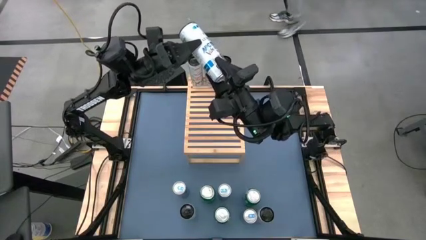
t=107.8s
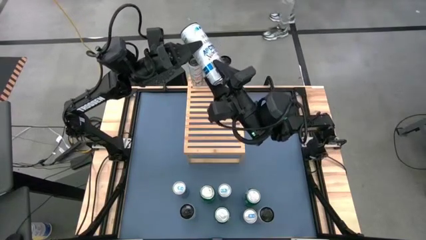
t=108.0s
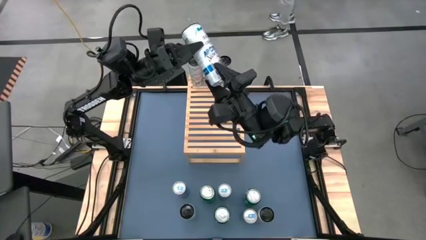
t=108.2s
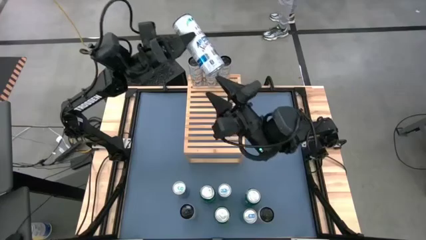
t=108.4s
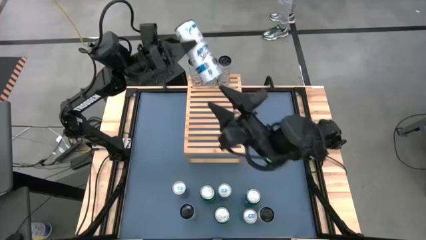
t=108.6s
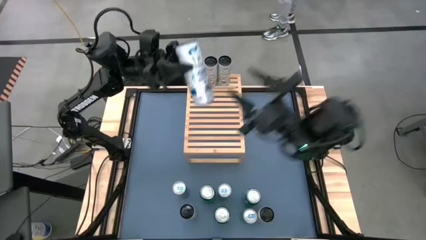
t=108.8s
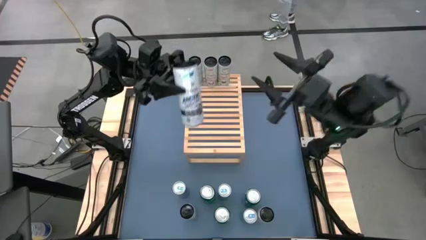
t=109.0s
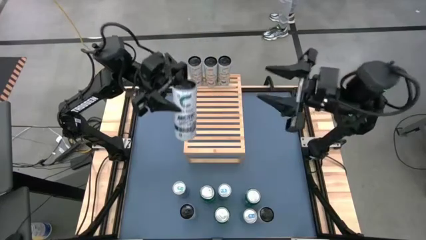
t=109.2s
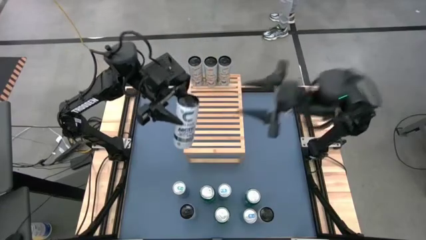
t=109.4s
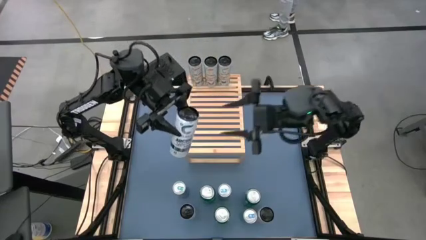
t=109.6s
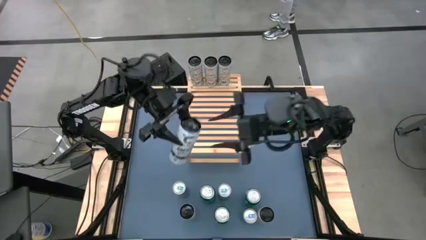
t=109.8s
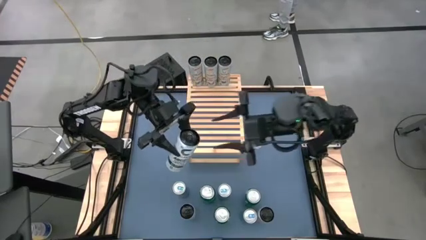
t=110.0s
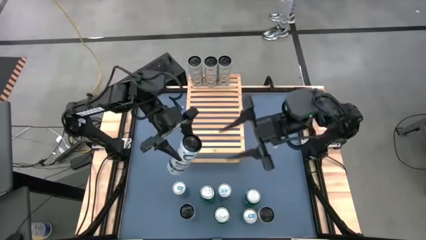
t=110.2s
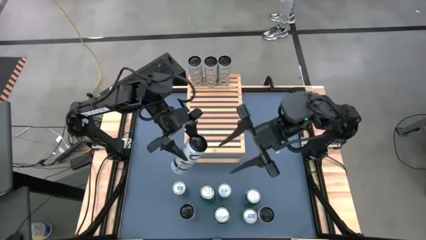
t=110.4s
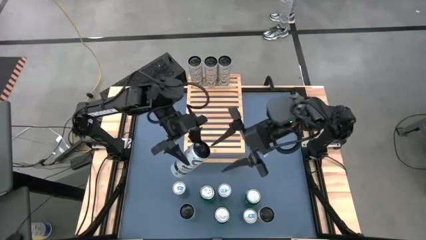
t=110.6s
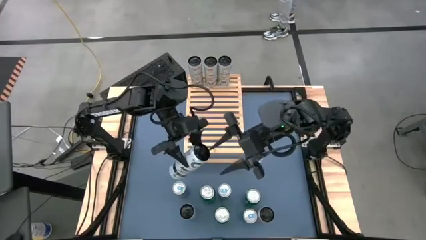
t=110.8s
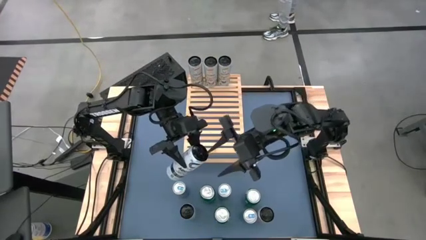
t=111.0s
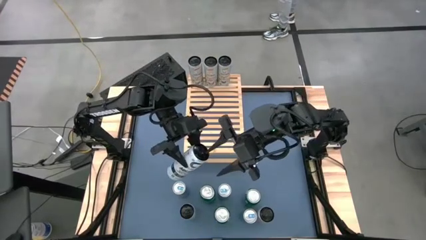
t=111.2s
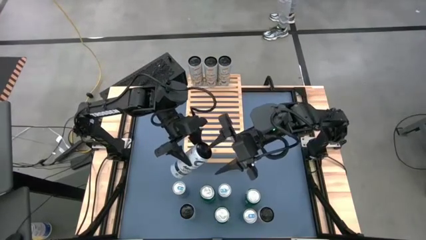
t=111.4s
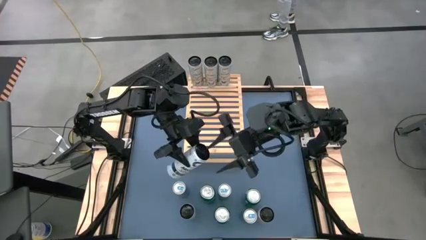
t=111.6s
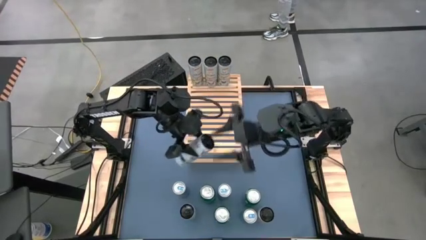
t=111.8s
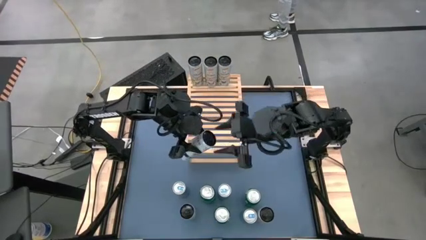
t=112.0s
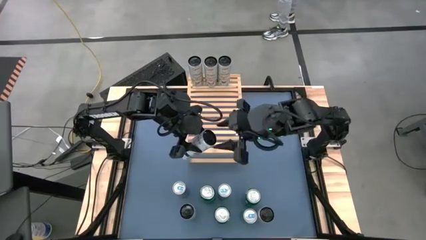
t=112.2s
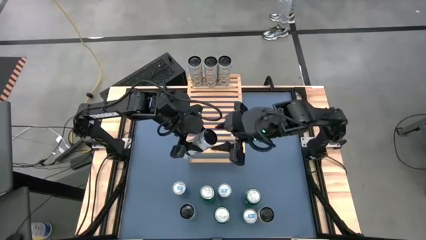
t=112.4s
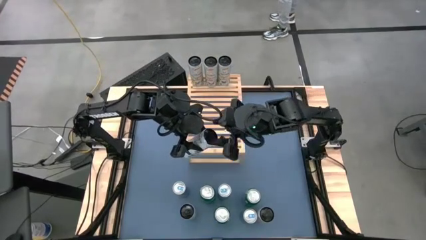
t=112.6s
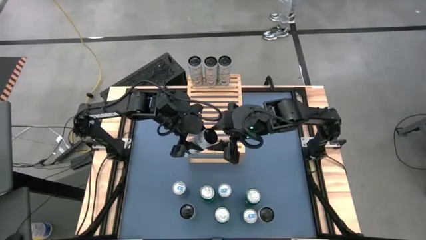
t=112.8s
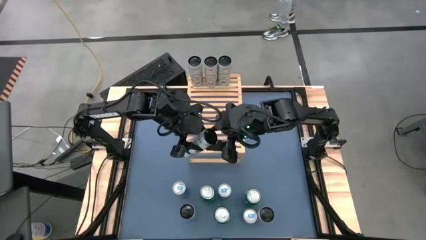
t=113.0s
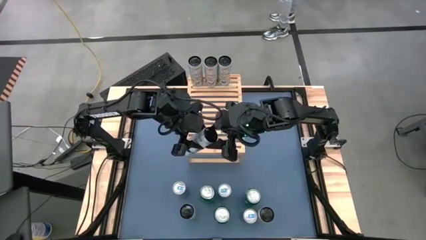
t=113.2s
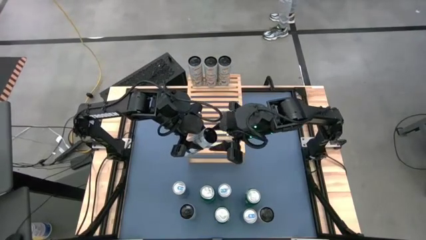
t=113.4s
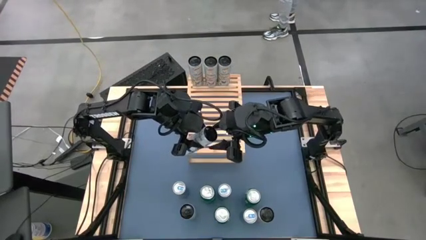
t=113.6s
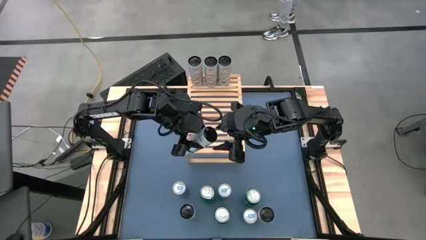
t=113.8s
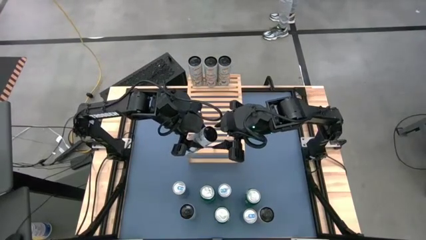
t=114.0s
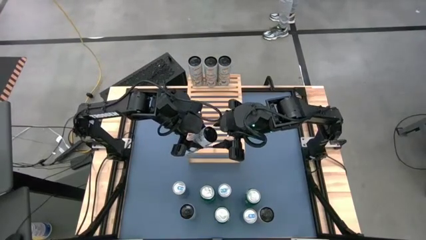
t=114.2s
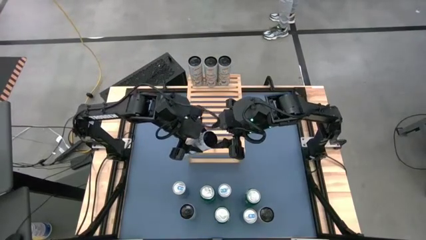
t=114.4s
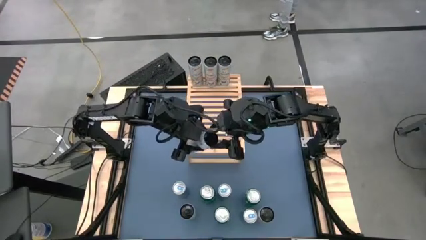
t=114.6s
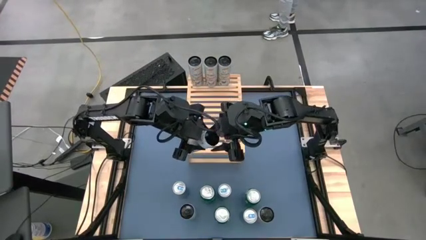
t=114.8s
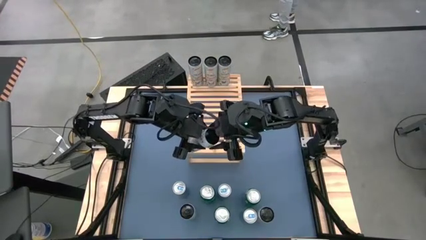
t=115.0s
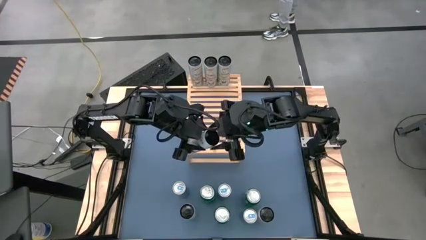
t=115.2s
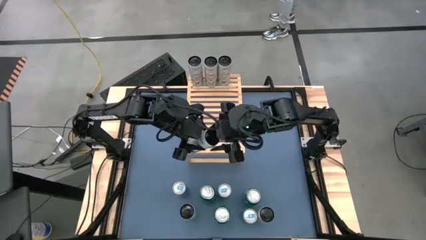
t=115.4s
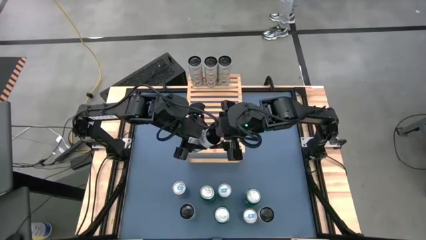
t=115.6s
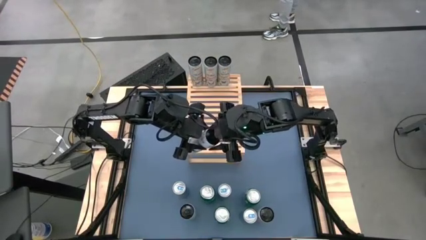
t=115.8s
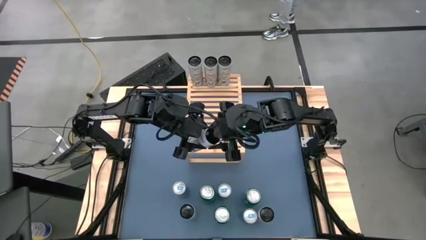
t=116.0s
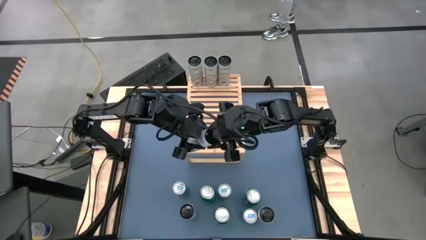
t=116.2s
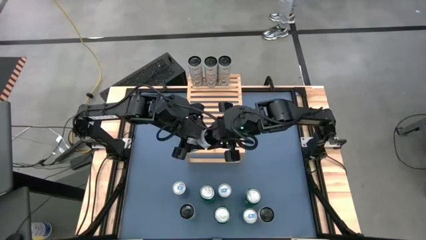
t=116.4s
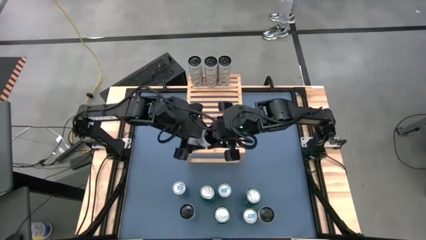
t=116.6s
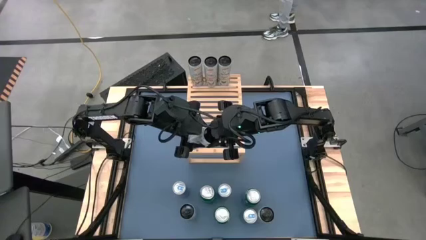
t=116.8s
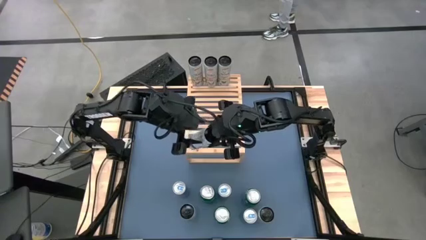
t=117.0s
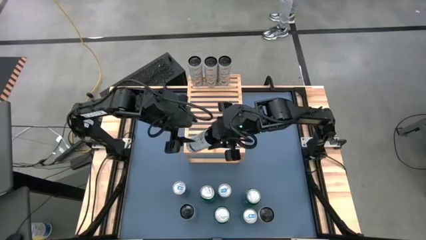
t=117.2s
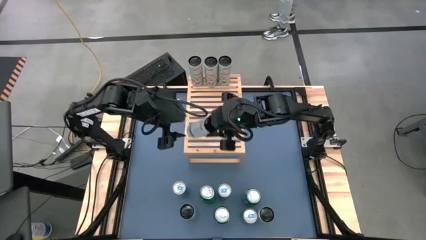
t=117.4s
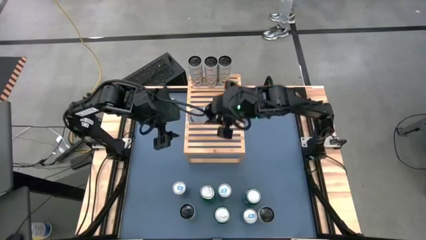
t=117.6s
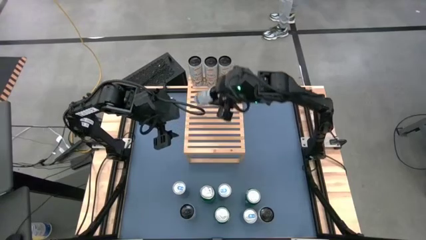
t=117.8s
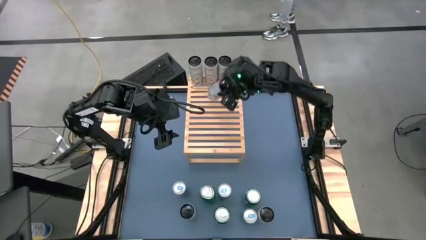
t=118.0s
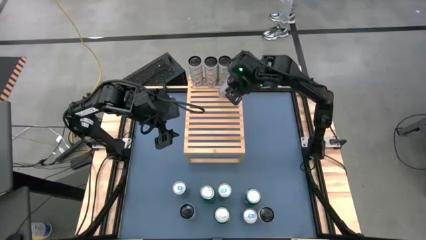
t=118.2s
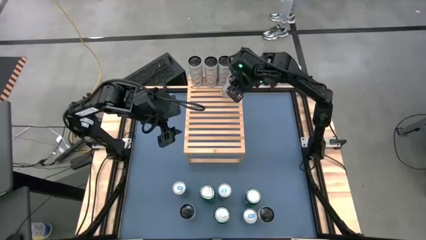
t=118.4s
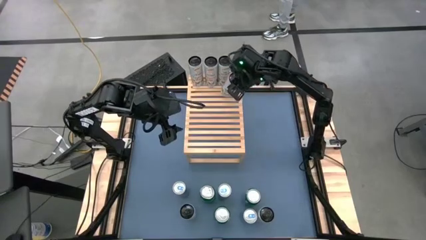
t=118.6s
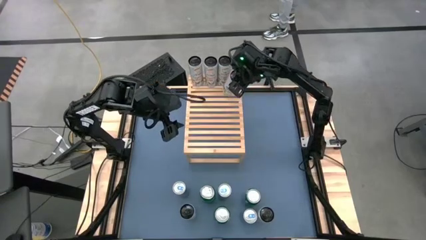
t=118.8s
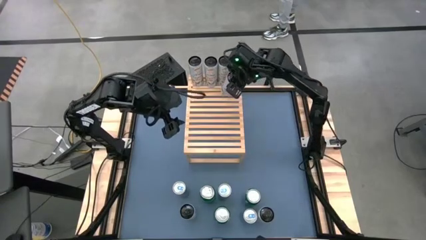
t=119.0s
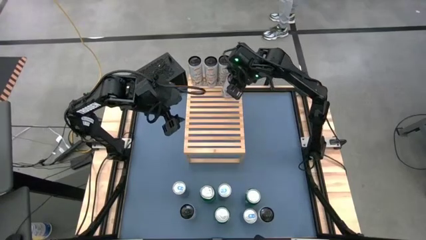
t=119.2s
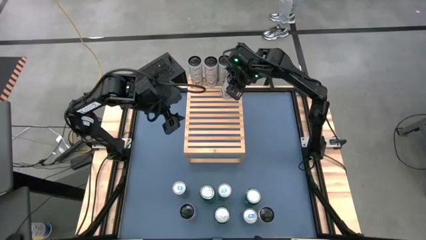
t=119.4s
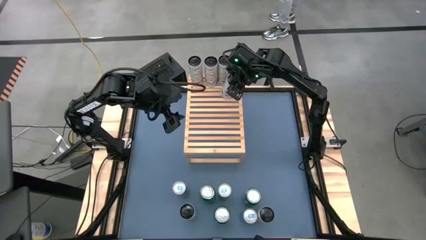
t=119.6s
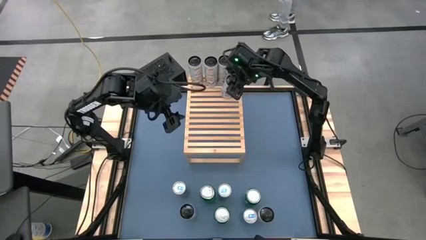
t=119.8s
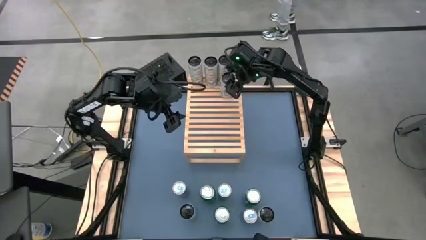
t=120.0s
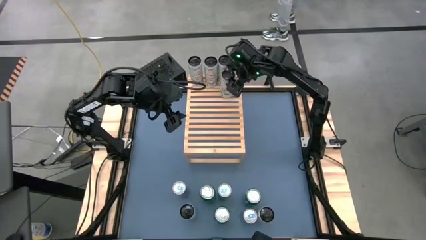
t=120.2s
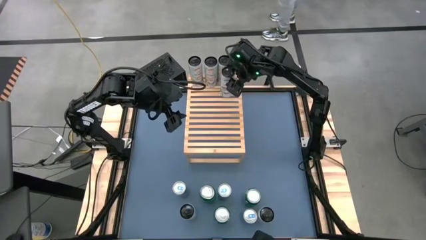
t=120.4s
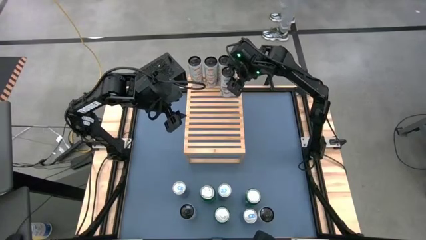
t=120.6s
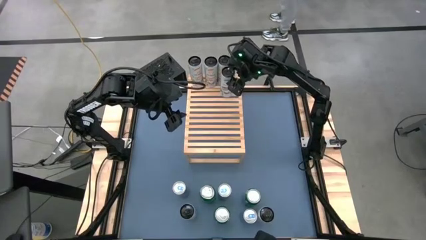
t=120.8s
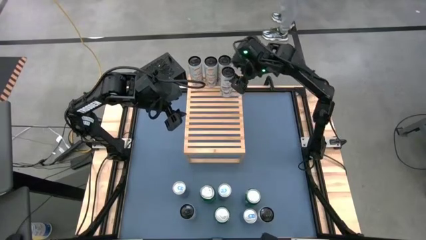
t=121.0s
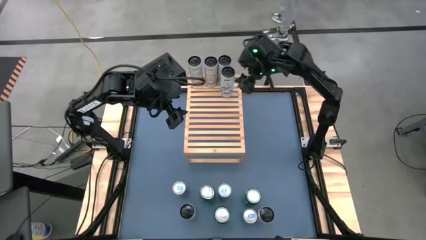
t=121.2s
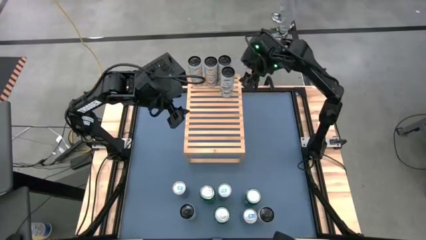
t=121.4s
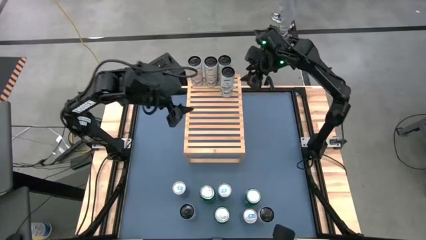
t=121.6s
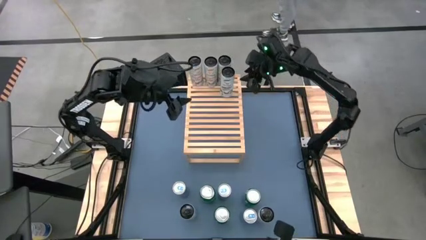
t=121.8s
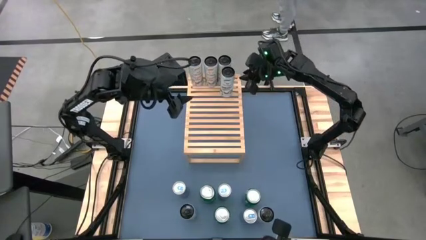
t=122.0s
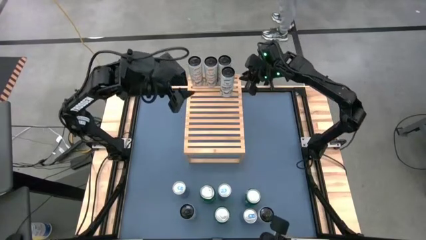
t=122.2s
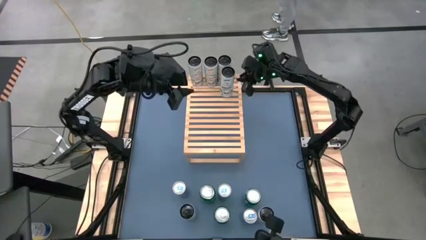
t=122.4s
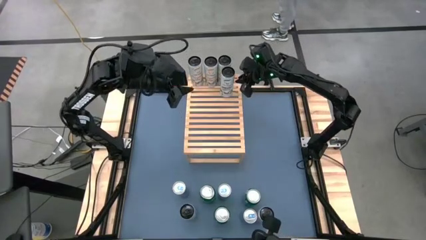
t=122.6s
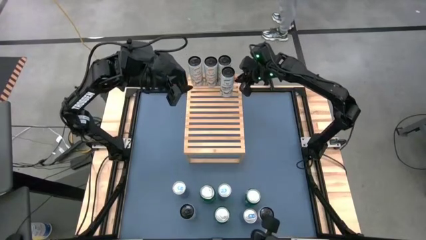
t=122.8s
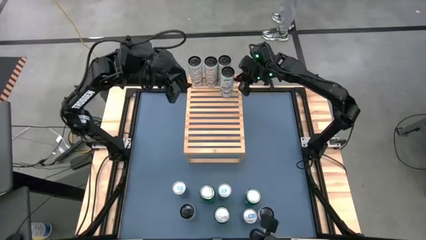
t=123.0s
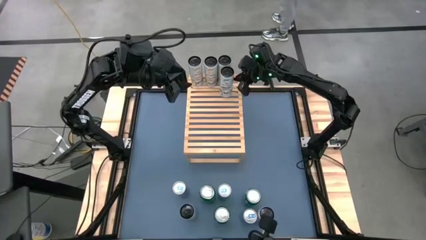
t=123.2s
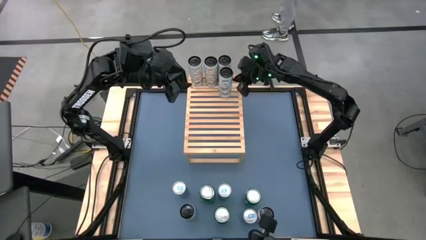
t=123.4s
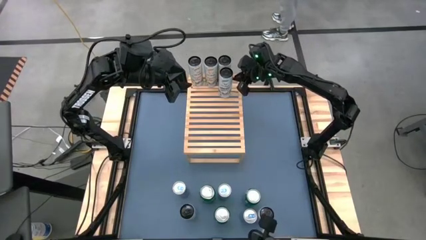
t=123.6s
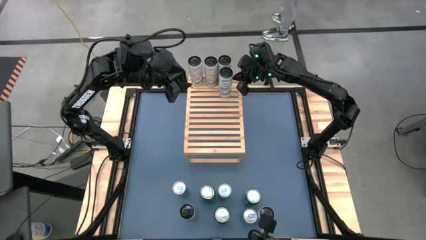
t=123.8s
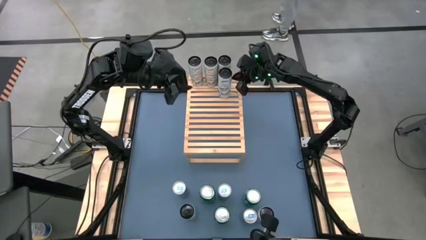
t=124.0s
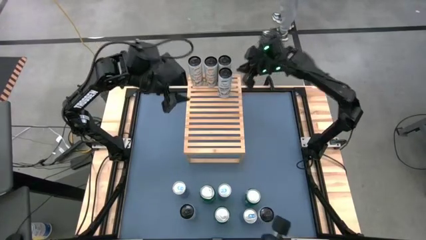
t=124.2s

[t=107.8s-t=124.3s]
Task: Place canned beverage on shelf
Put the white blue soda can on the shelf
